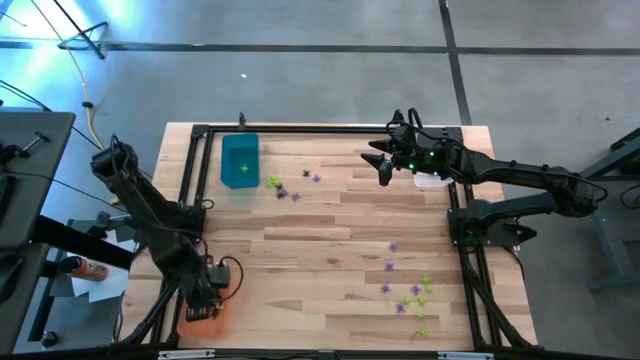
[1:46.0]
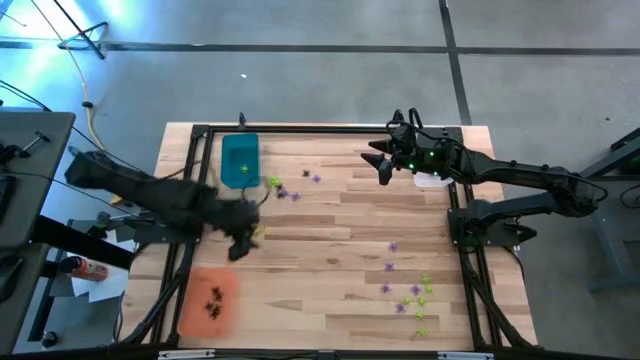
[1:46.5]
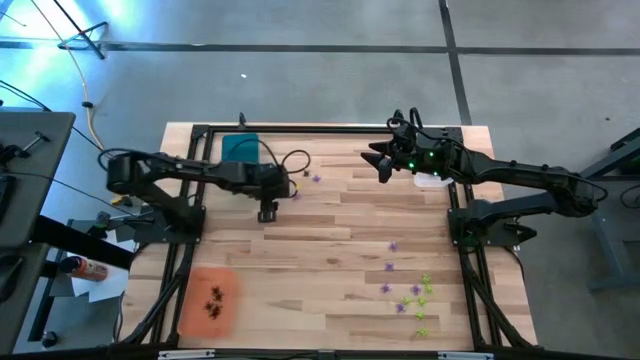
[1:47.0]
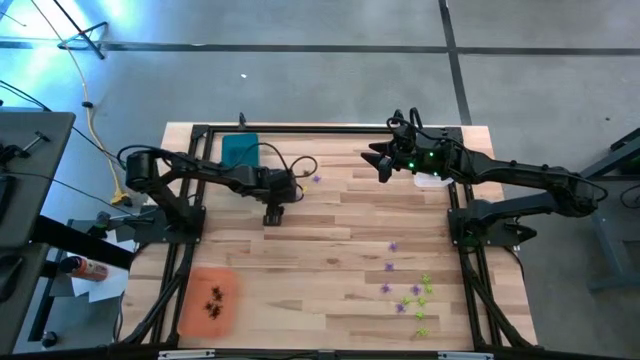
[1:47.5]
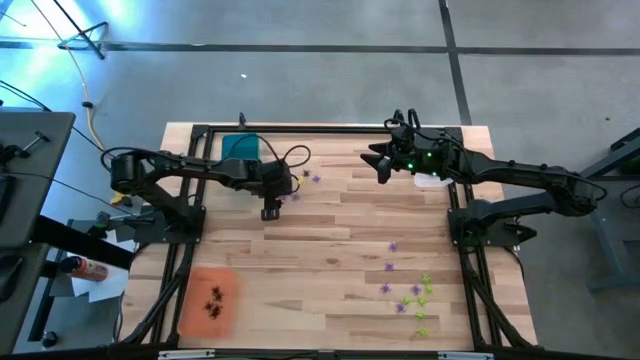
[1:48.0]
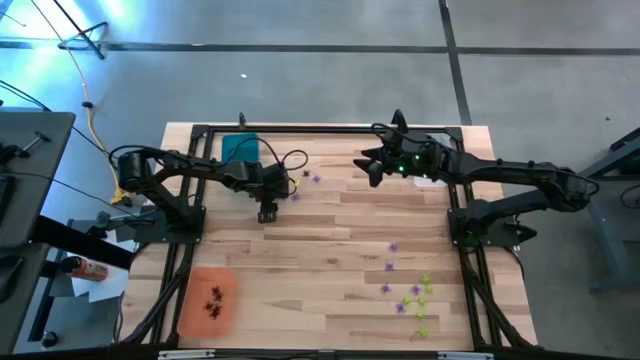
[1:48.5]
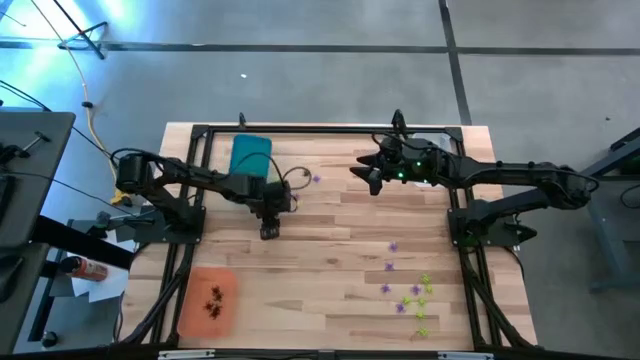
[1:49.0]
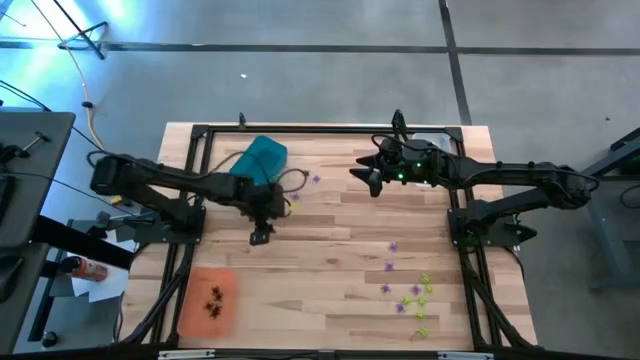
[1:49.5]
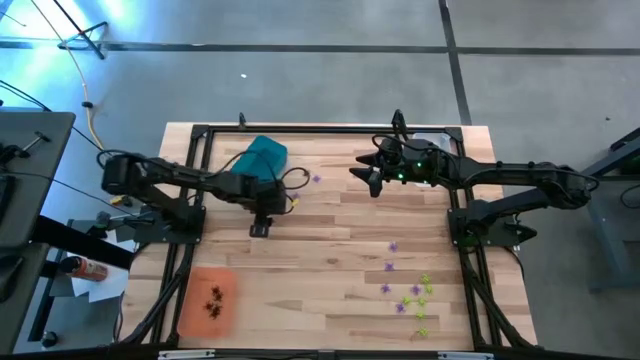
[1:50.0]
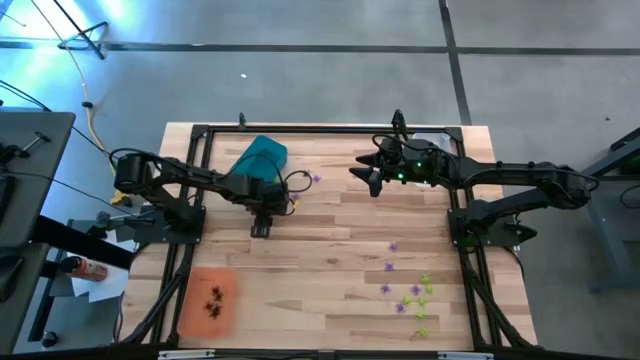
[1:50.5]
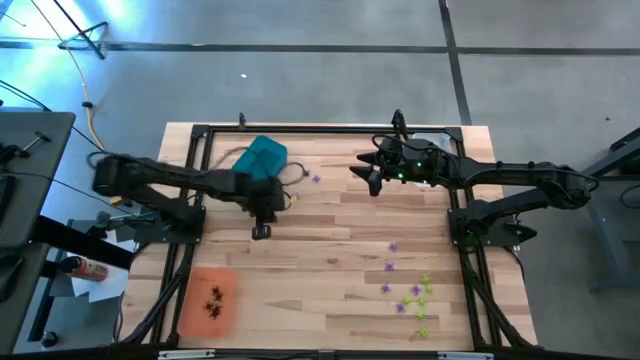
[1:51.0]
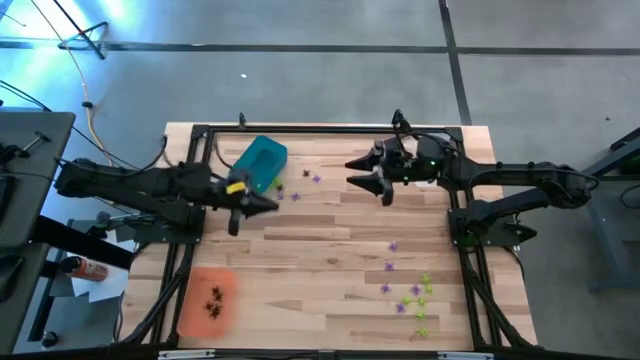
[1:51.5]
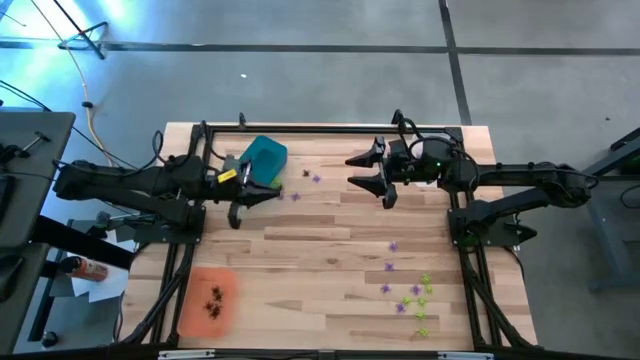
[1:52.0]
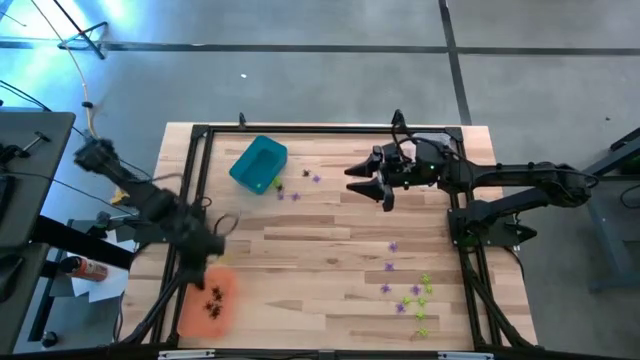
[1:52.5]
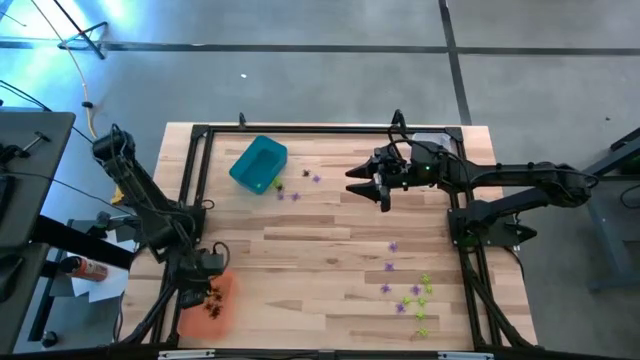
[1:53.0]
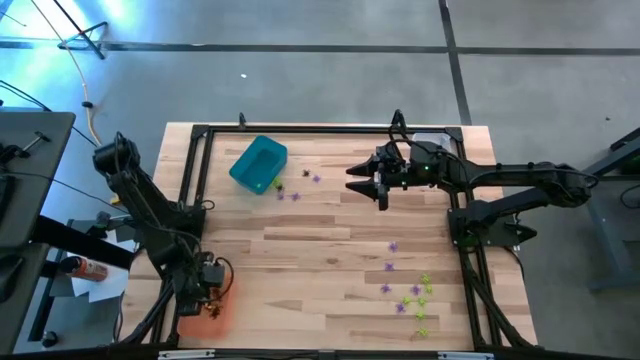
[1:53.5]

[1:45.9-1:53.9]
Task: Sort Halloween decoration
Put the black spider toy into the orange bin

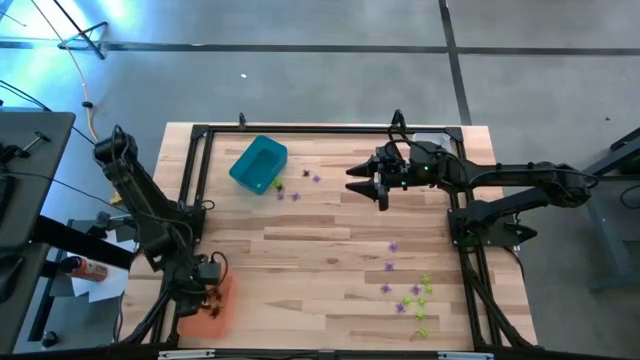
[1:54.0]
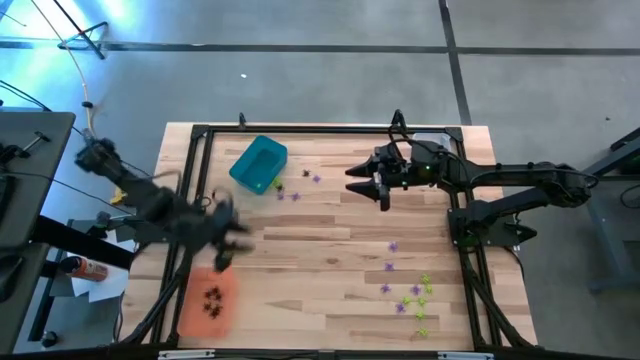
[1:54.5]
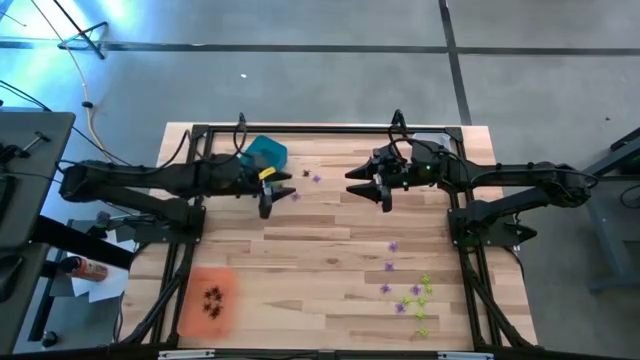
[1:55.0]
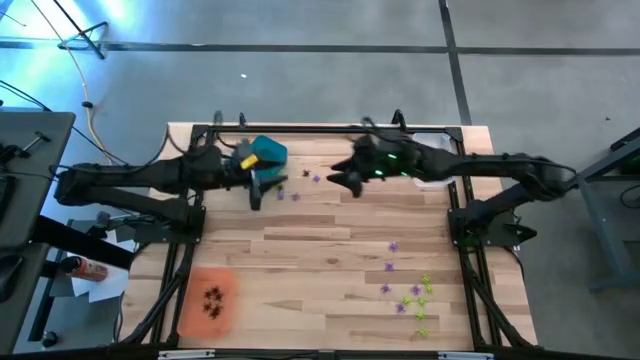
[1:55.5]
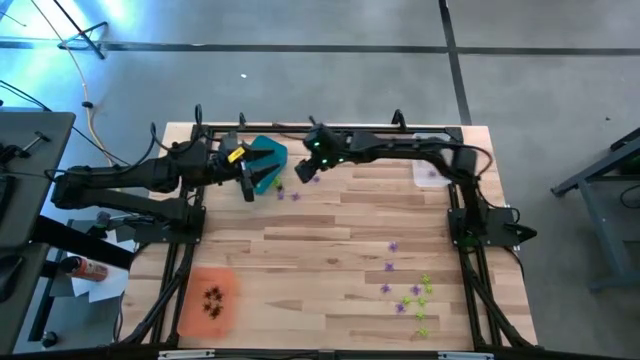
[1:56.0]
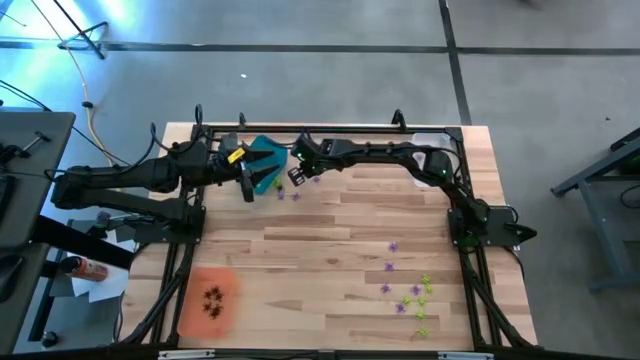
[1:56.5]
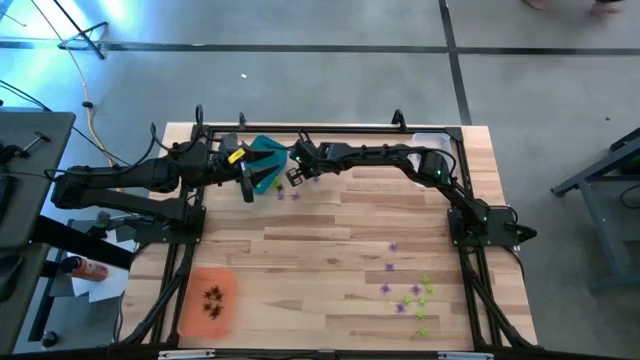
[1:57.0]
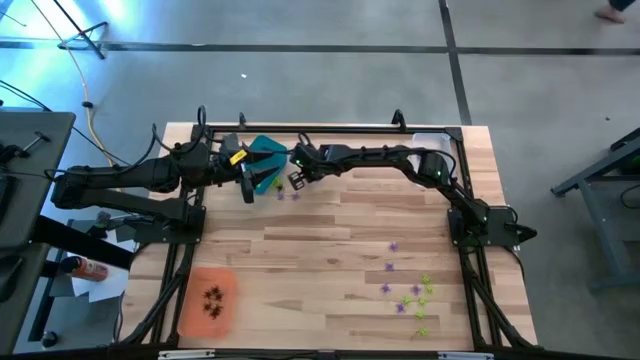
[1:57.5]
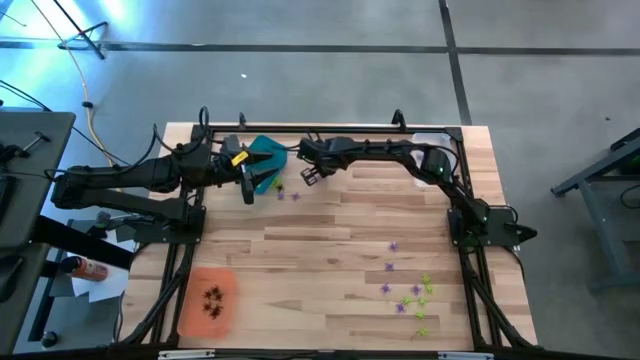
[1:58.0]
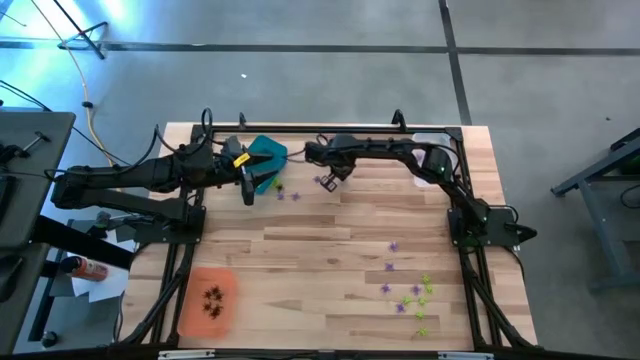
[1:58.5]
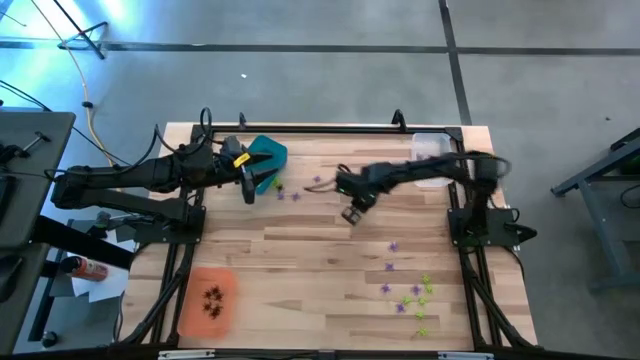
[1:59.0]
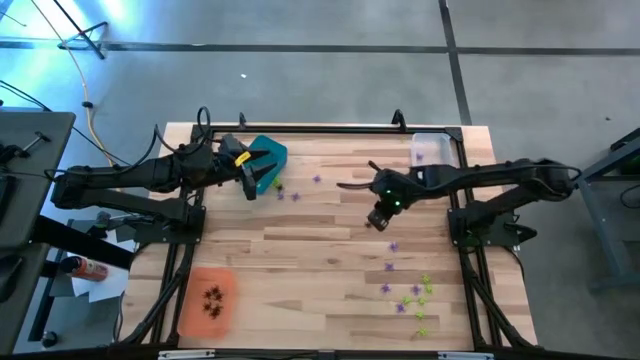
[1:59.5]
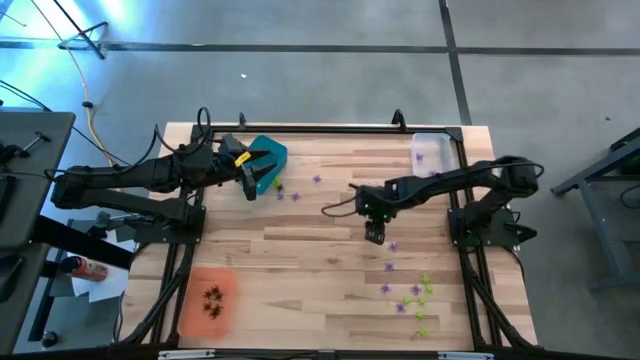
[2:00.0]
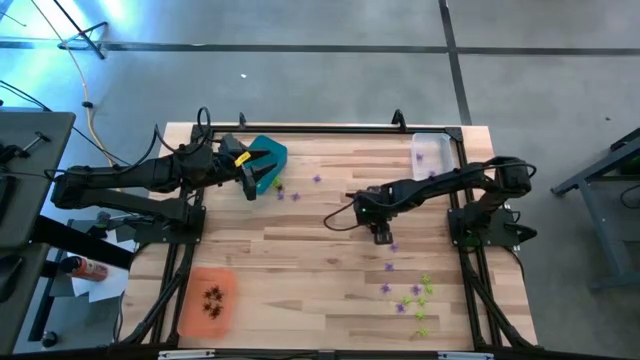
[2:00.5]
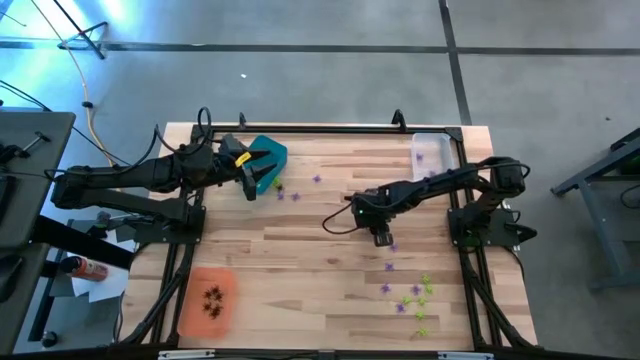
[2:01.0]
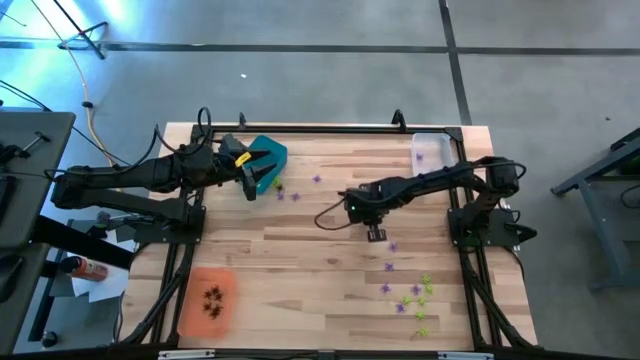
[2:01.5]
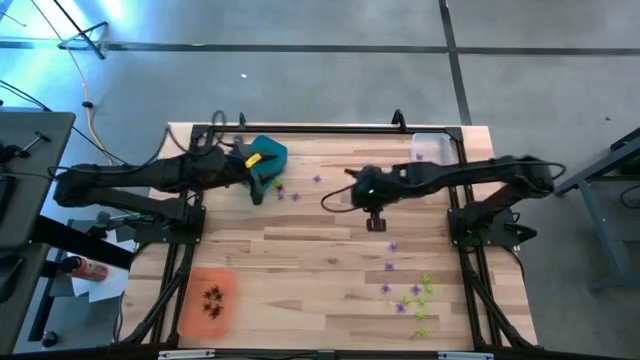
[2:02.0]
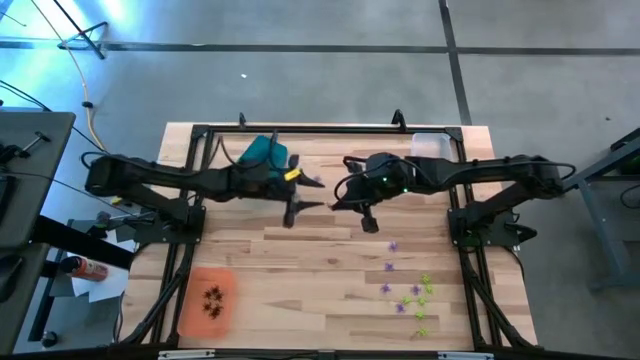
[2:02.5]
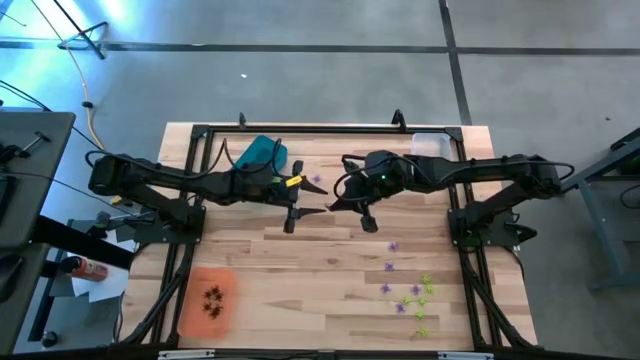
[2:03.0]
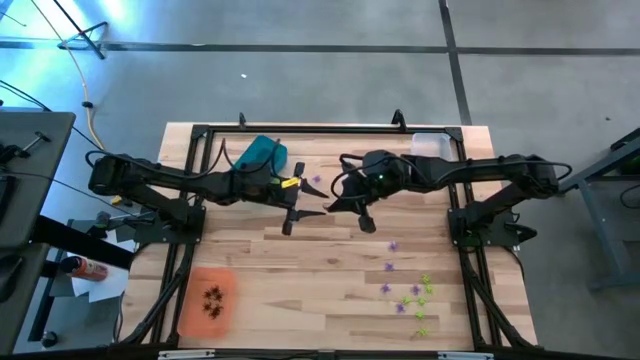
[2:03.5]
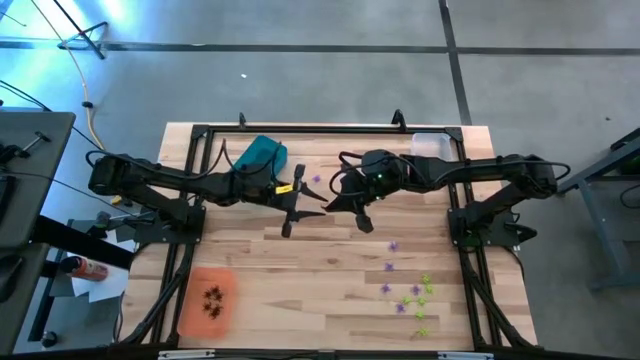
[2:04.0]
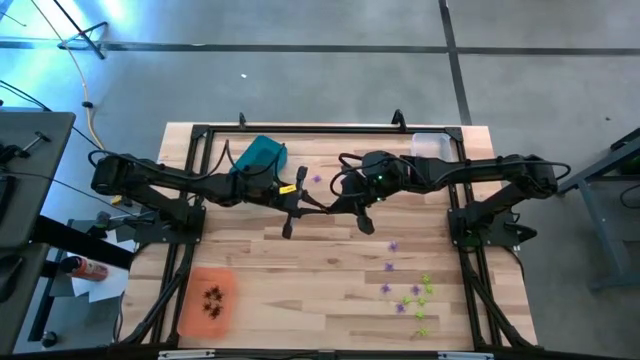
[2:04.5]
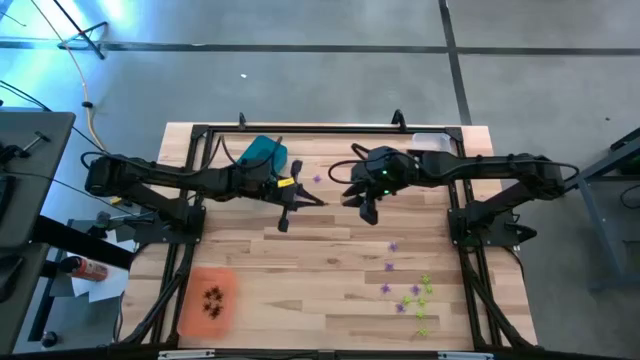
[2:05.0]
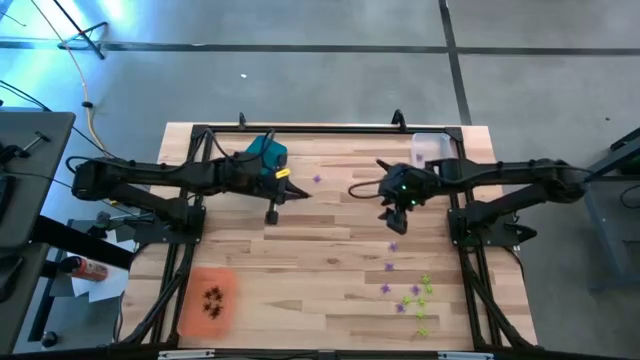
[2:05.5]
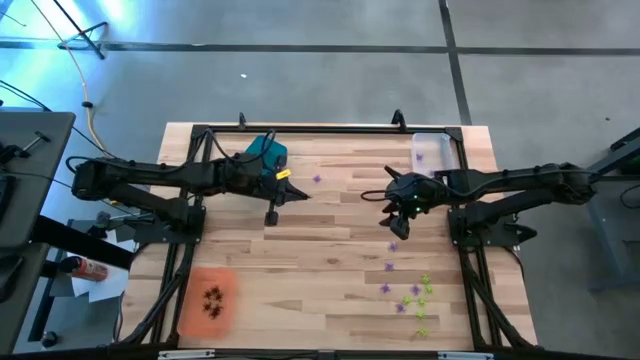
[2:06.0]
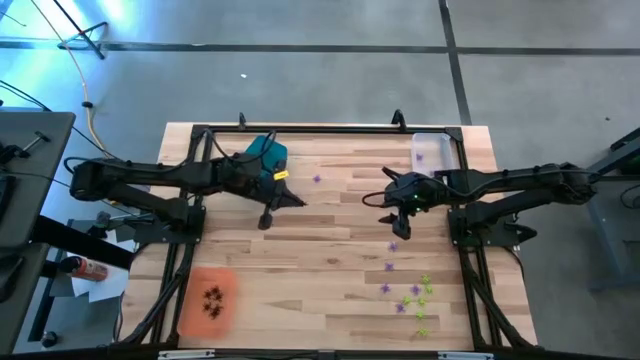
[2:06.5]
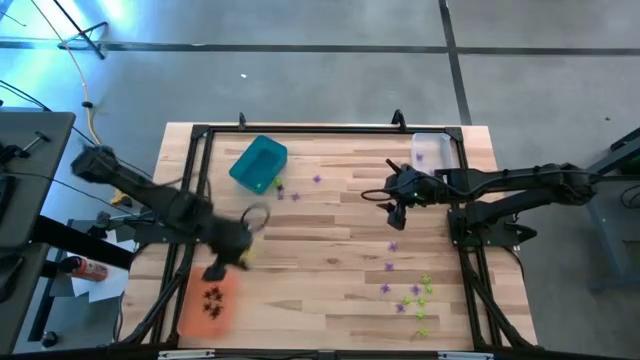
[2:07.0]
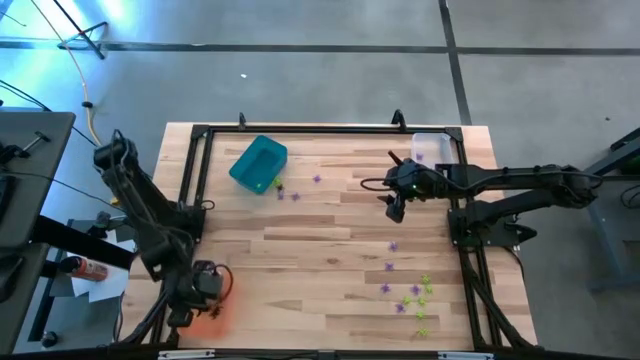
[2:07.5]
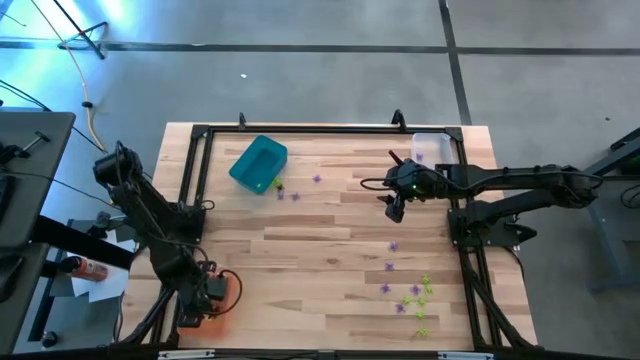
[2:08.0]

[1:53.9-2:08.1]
Put the black spider toy into the orange bin
